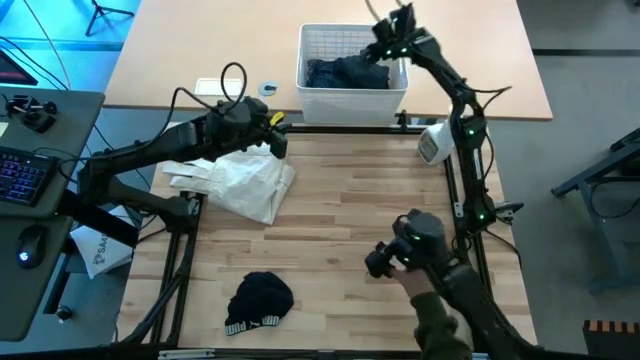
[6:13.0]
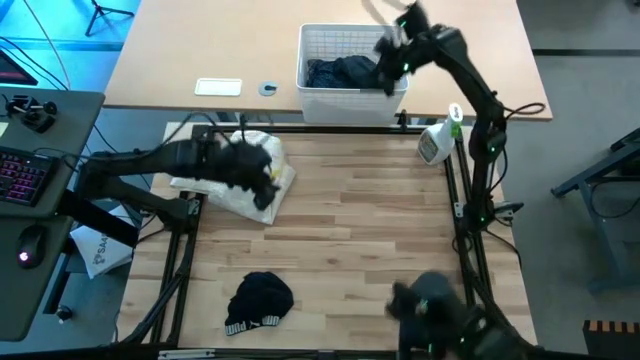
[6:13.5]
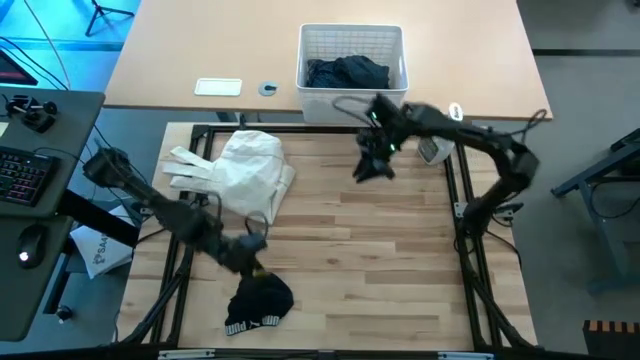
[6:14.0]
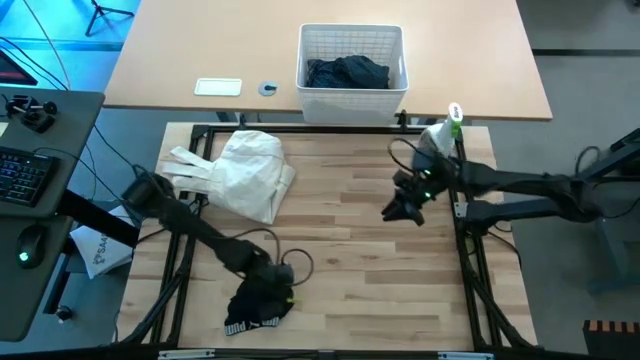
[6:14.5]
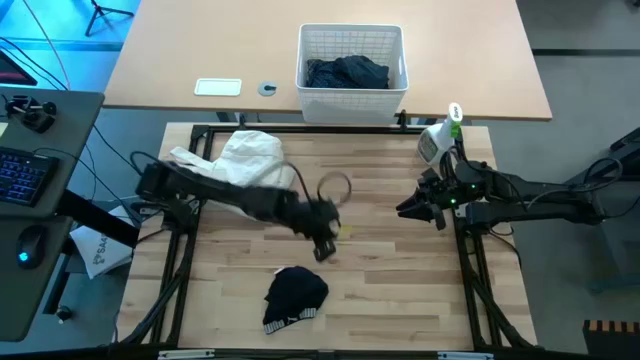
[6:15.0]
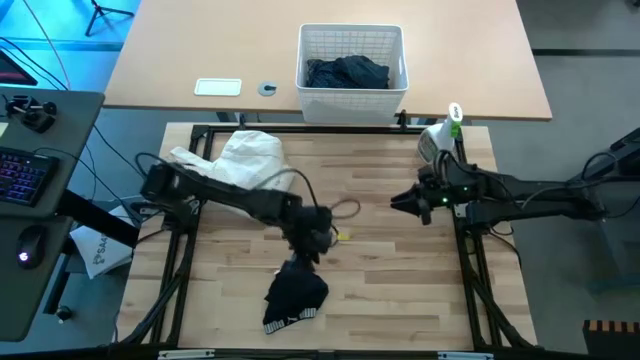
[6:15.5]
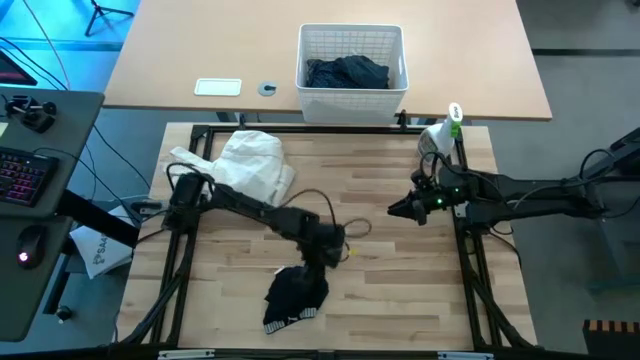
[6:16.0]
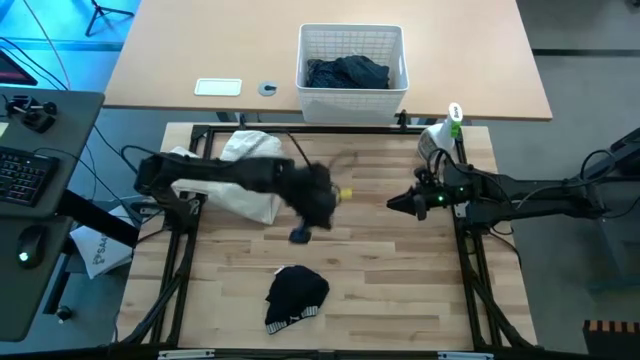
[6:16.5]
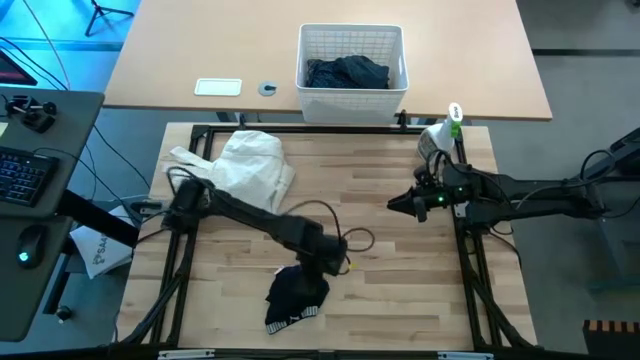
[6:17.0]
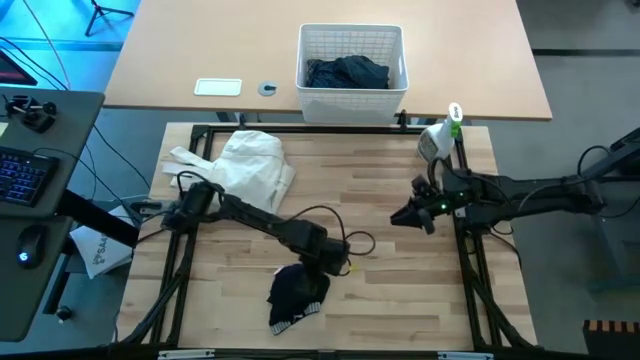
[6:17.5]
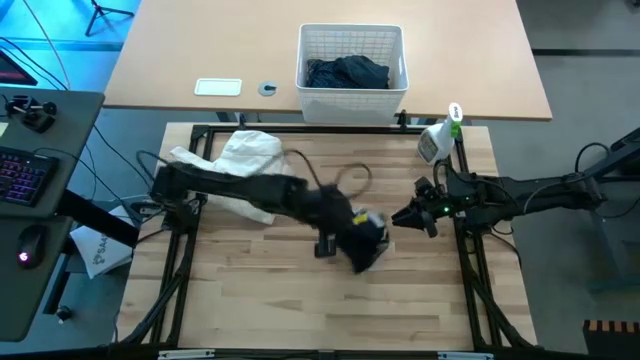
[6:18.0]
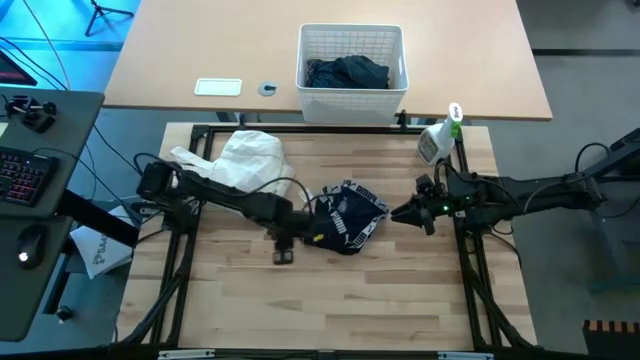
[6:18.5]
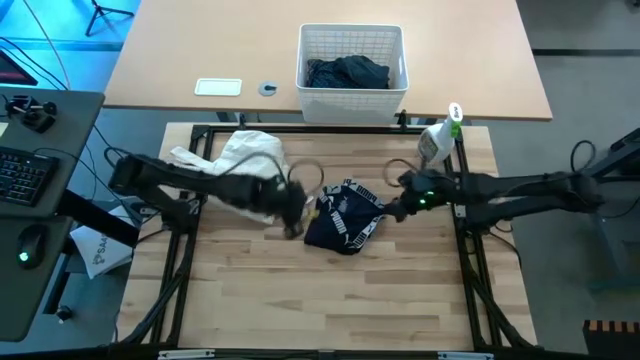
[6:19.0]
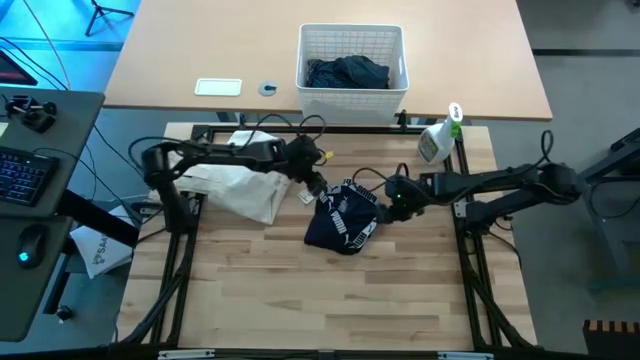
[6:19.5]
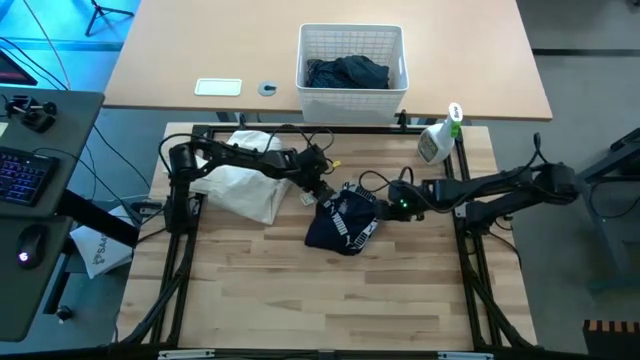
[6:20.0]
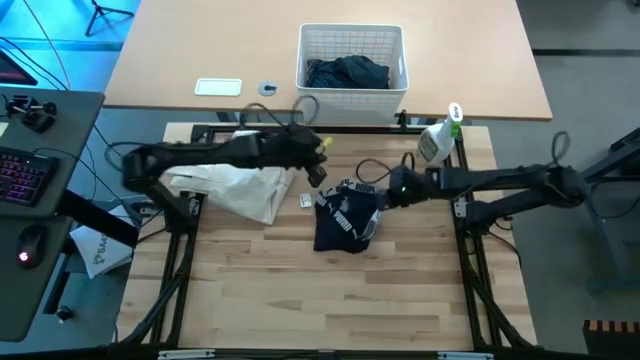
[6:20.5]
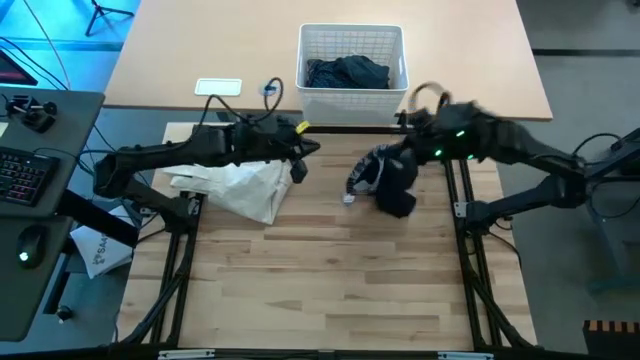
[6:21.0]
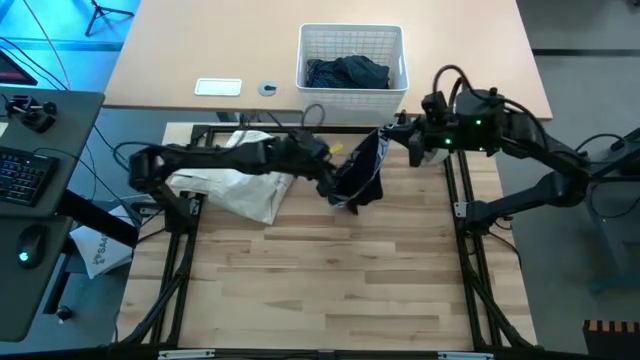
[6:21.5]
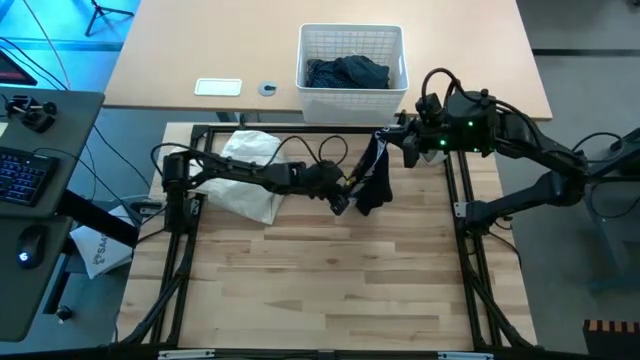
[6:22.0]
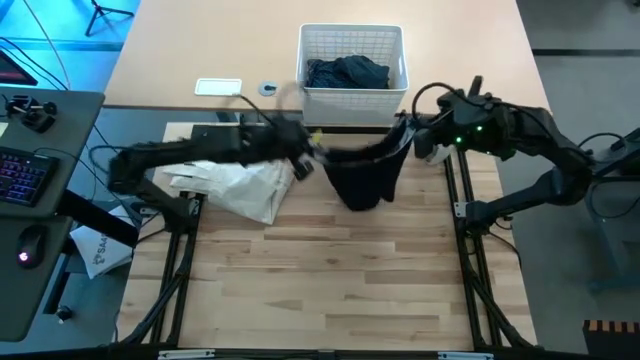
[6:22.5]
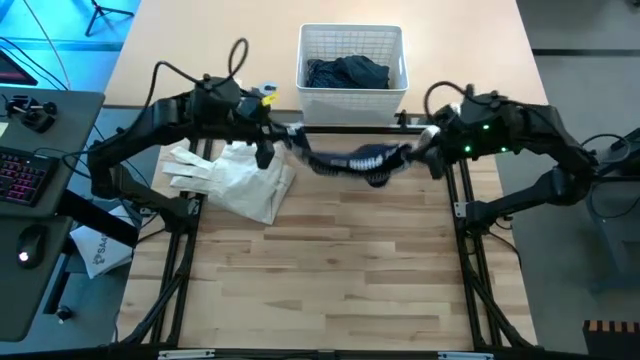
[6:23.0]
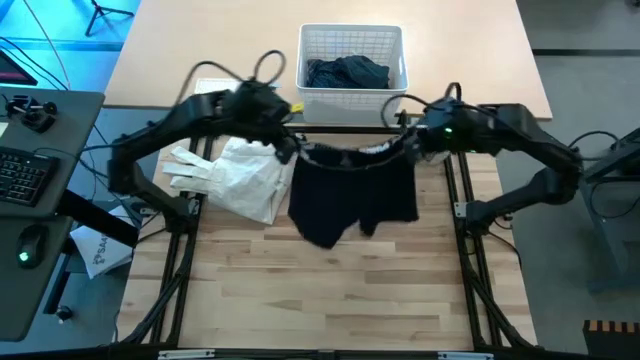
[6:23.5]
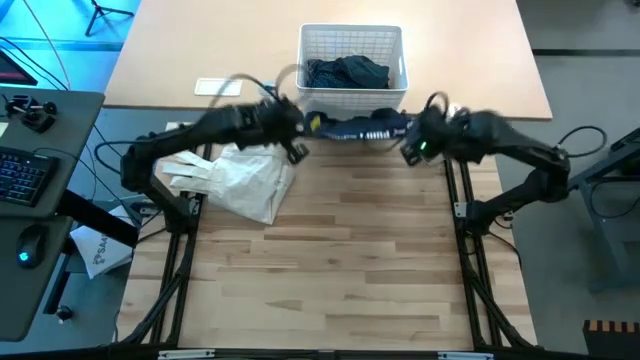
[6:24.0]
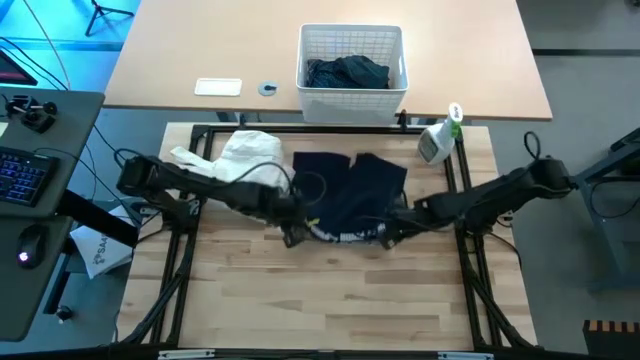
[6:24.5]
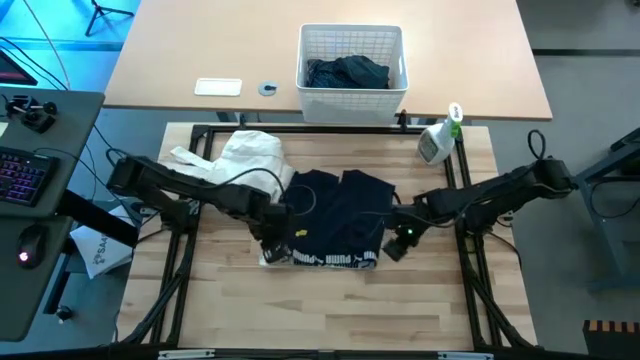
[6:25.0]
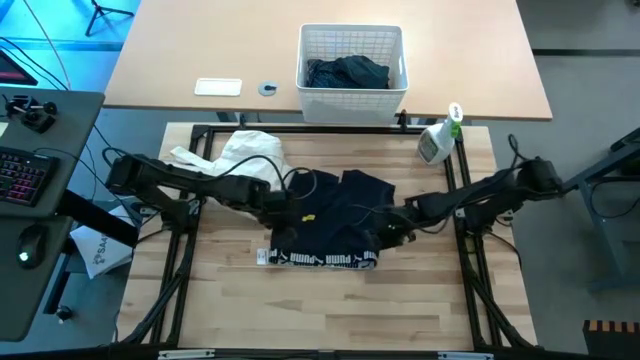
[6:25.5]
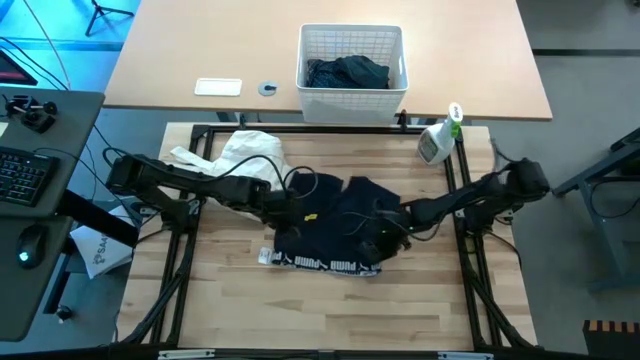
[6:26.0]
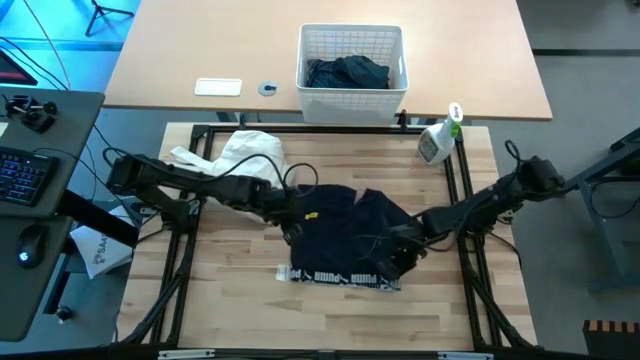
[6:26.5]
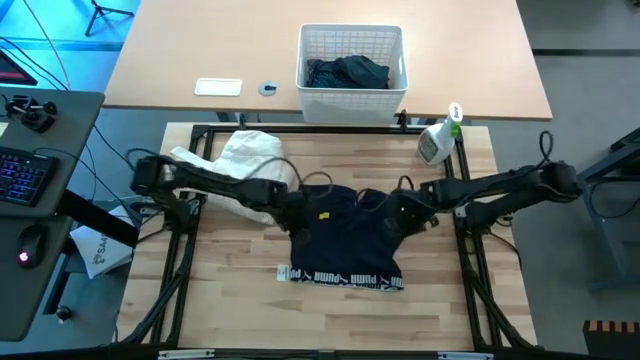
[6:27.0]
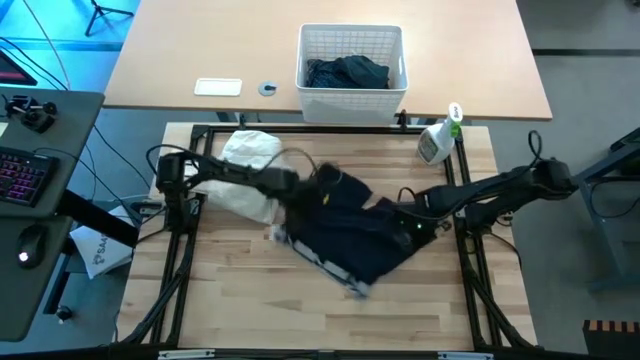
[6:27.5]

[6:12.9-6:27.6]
Task: Fold laundry
Fold the blue underwear

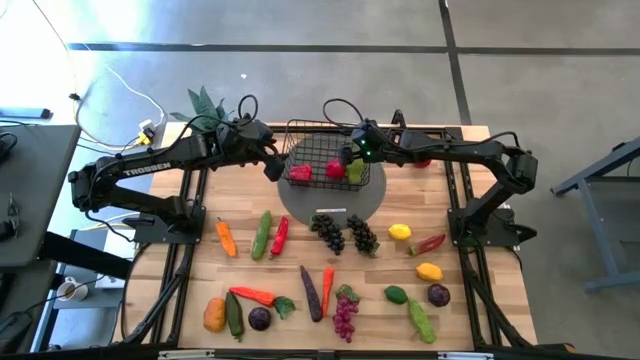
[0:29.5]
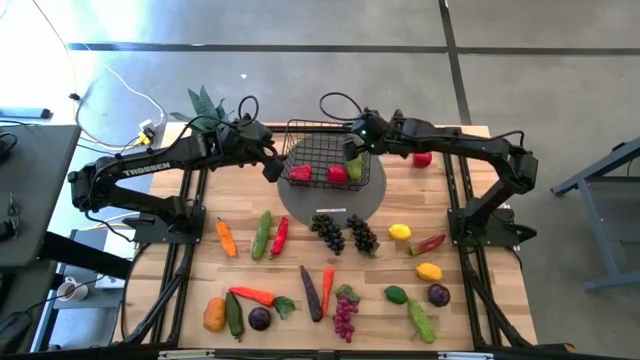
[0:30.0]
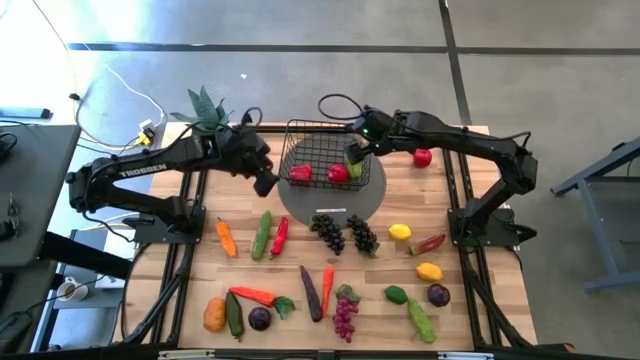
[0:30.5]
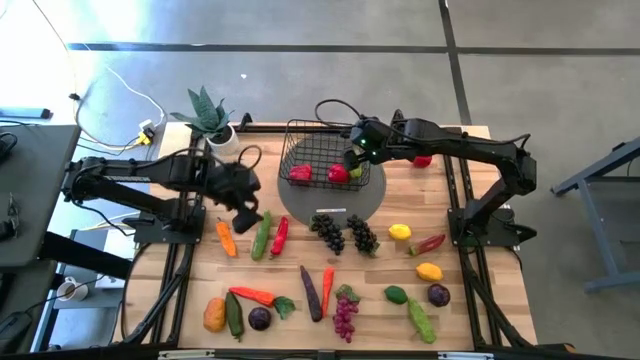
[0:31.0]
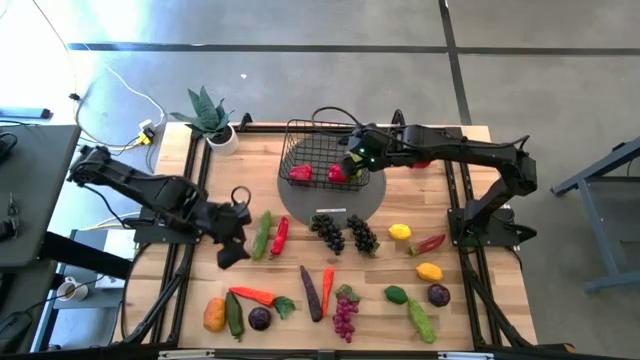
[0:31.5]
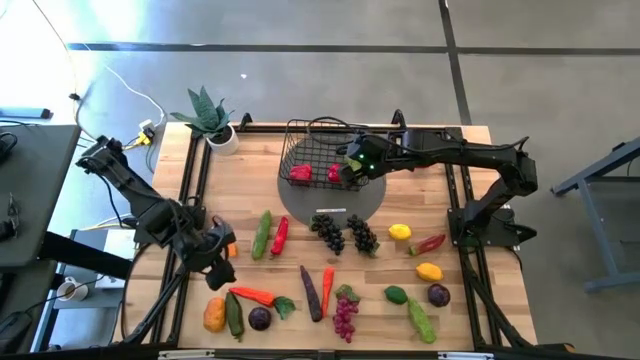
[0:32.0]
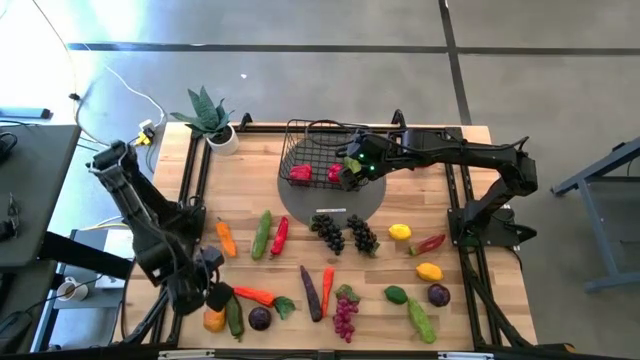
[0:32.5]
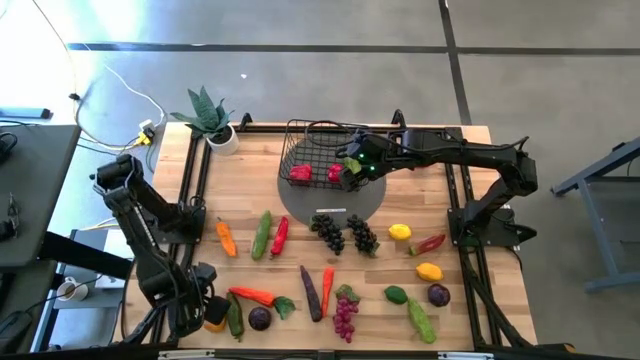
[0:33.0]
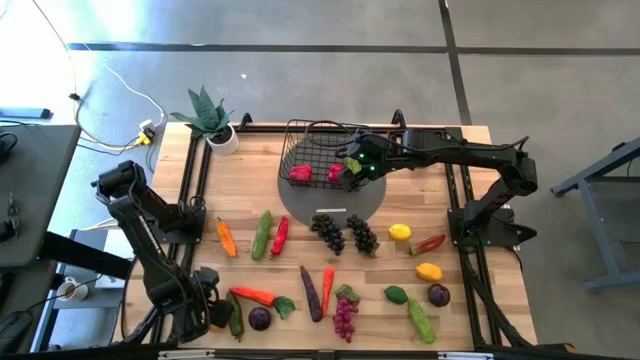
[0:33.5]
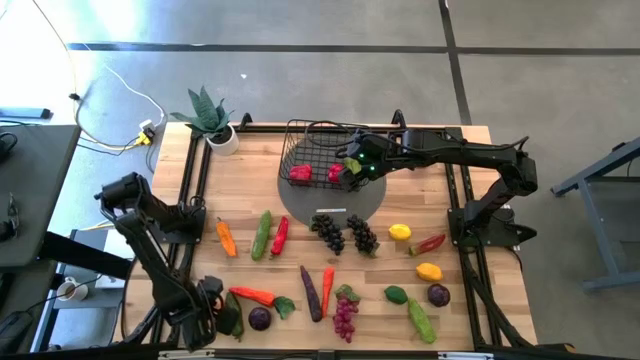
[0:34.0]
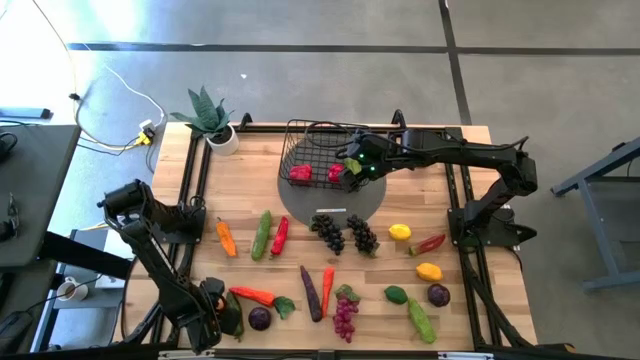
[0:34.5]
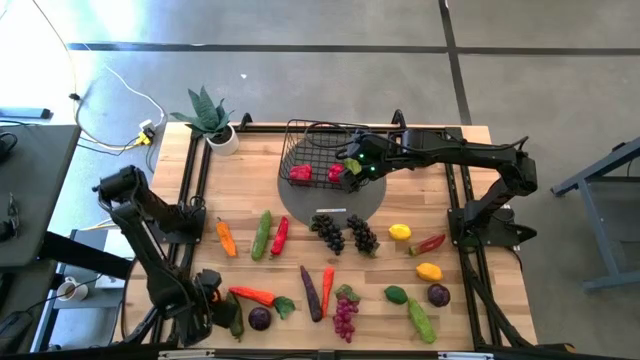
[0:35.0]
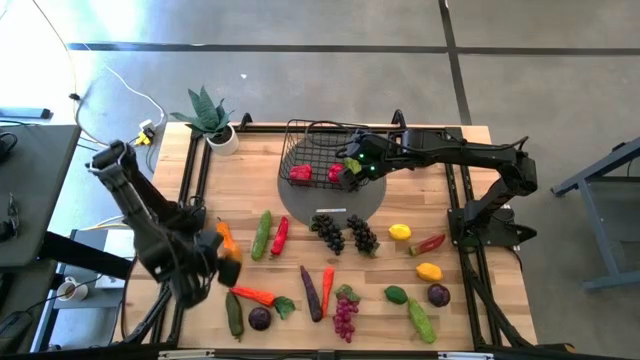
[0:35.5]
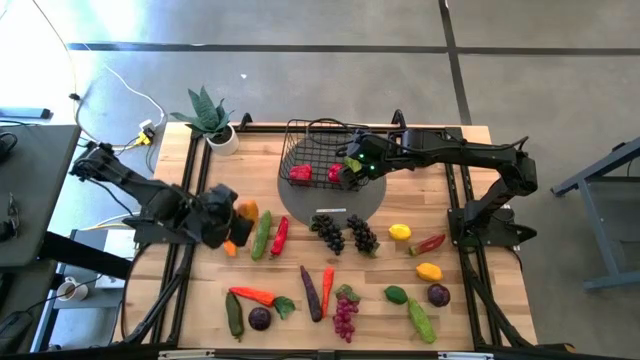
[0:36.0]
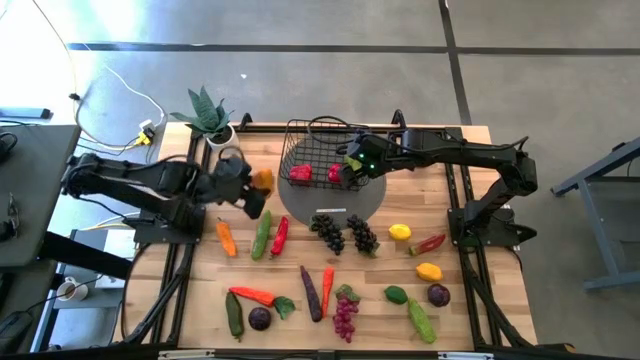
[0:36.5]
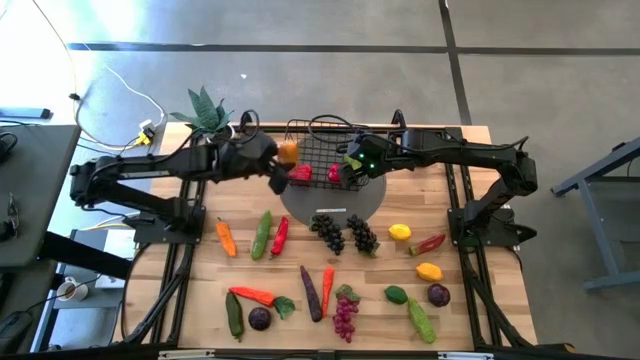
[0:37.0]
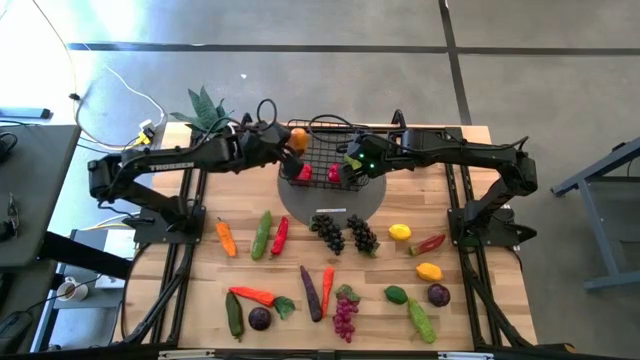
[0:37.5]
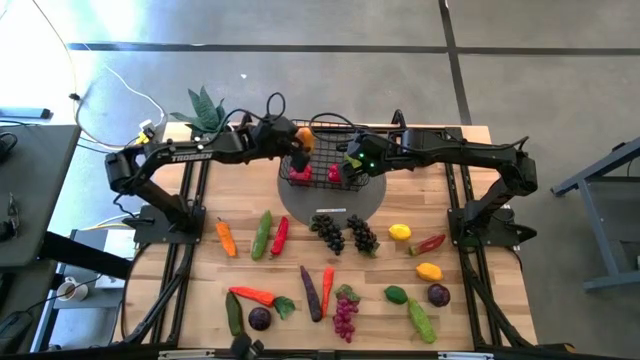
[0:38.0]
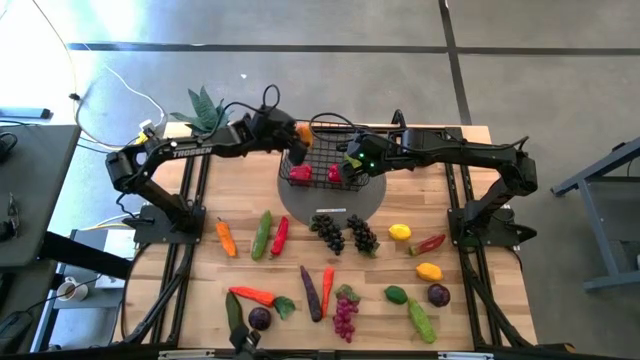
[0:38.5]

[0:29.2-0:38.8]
Task: Build produce basket
Put the yellow mango into the wire basket
